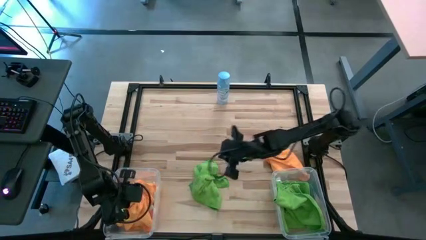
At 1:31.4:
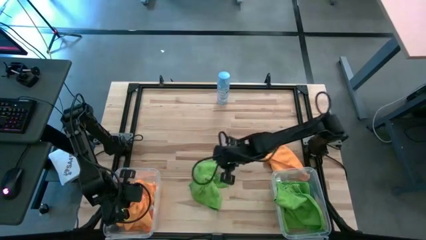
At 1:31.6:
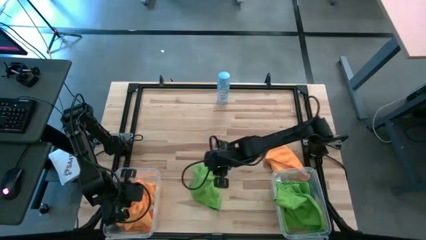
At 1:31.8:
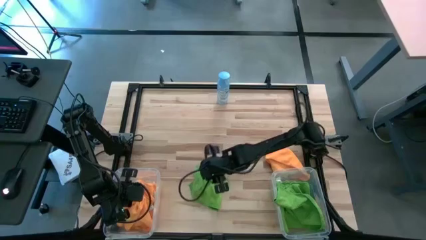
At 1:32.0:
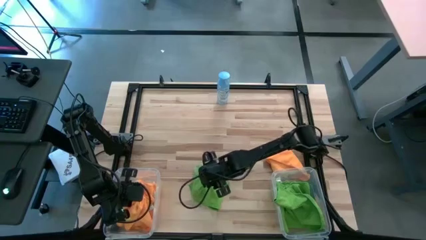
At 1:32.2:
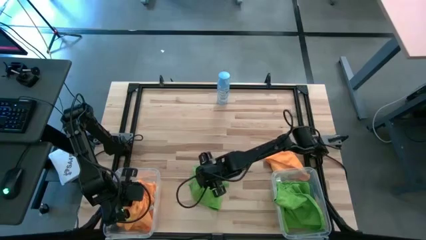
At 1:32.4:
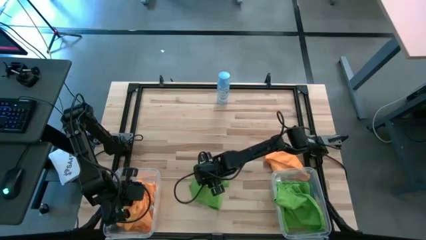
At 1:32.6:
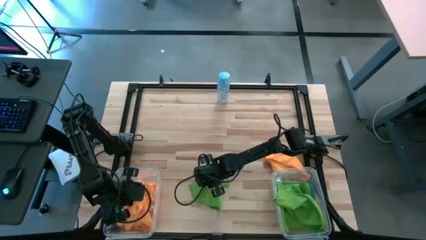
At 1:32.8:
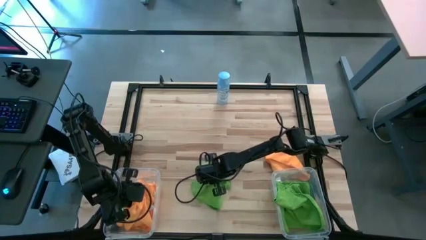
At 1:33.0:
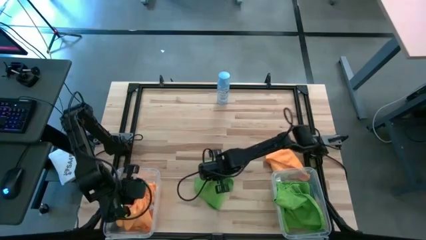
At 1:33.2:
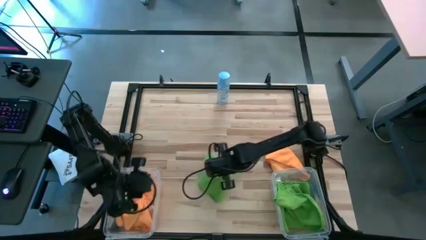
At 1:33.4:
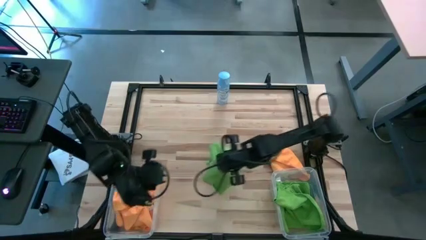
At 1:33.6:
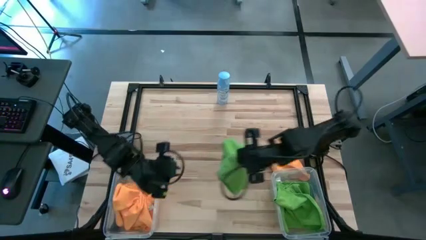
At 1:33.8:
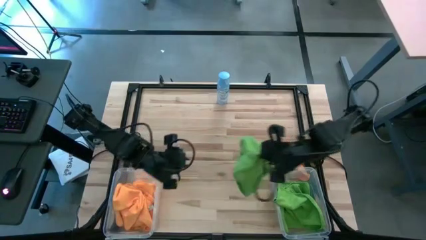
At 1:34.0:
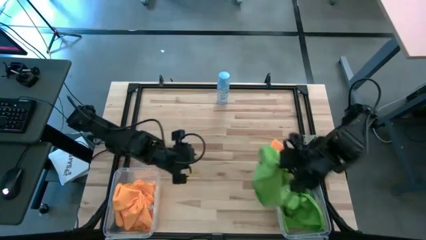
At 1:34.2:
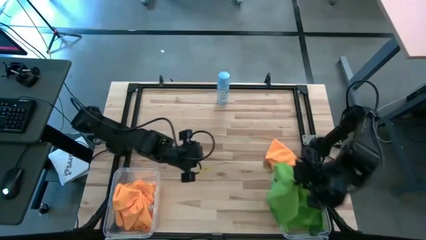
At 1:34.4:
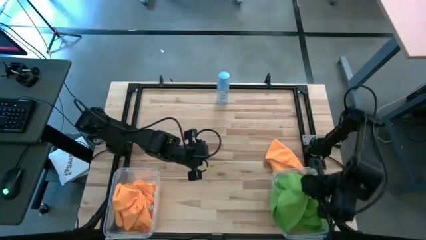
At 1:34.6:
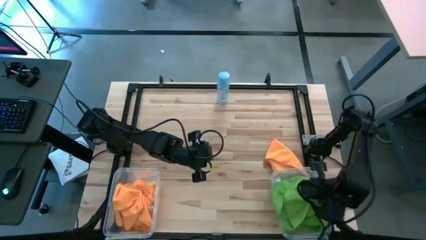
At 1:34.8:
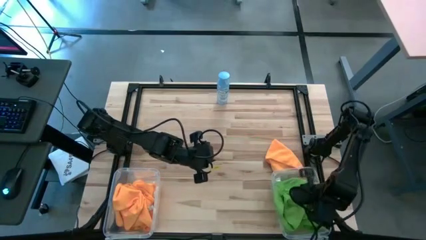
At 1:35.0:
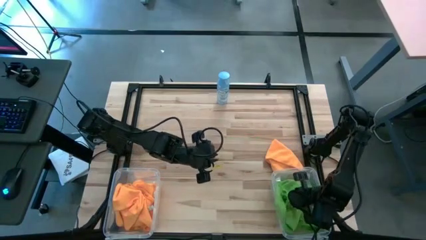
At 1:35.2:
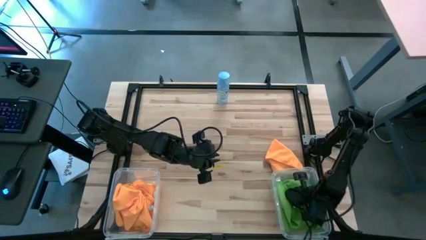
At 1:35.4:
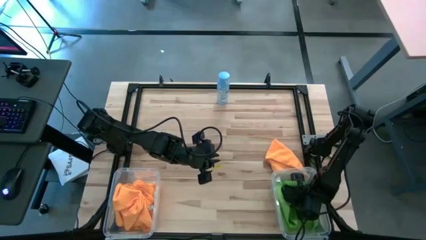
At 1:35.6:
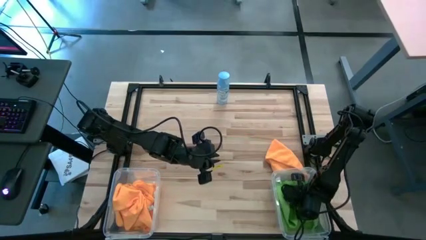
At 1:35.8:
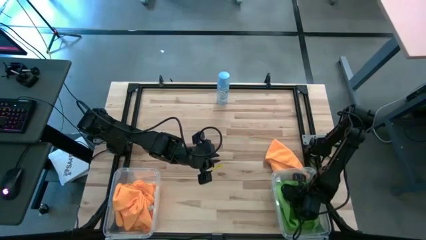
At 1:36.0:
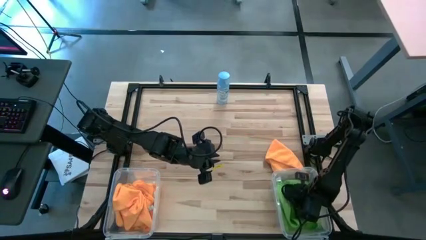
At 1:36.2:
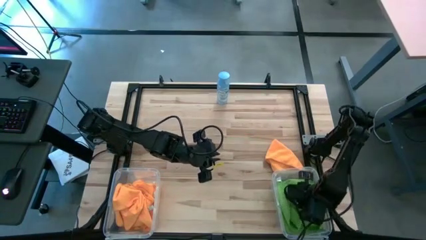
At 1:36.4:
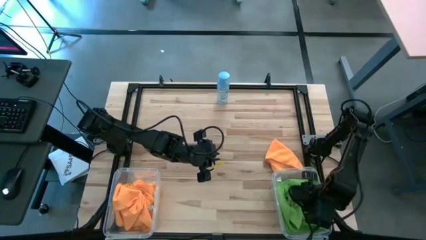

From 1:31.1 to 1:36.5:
Task: Sort microfiber towel by color & place in baskets
Put the green microfiber cloth into the right transparent bin

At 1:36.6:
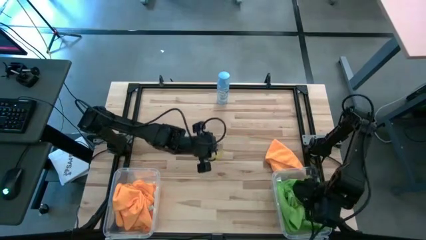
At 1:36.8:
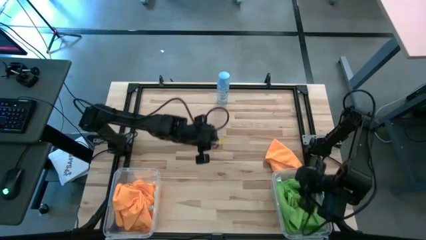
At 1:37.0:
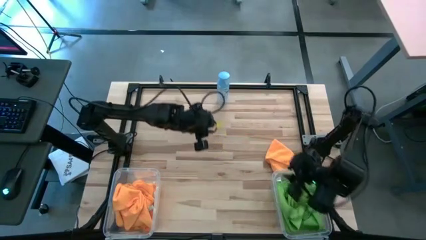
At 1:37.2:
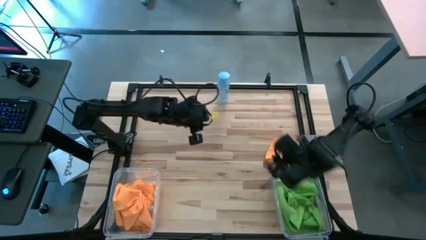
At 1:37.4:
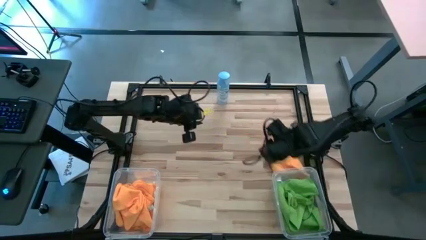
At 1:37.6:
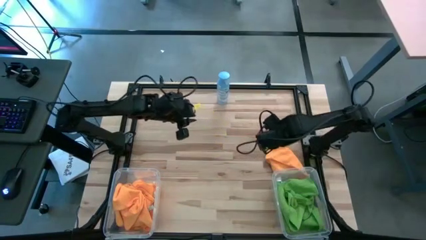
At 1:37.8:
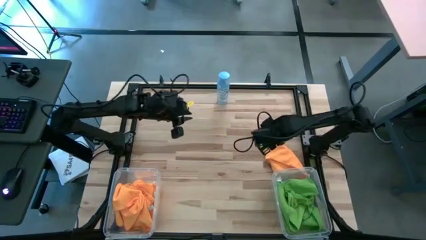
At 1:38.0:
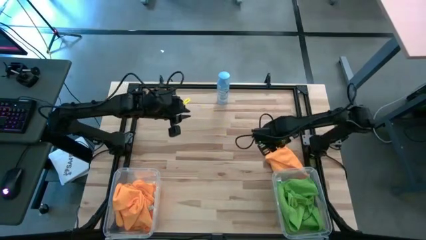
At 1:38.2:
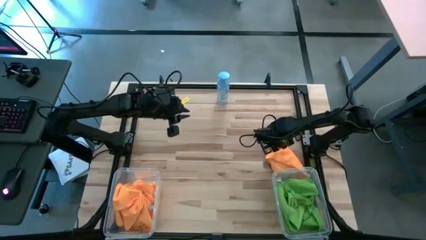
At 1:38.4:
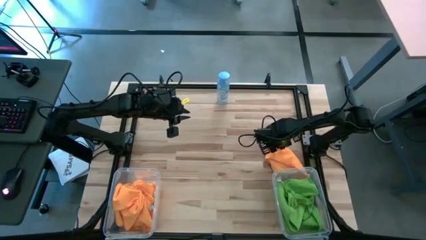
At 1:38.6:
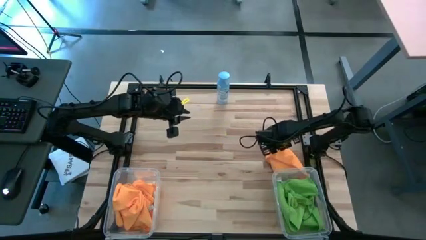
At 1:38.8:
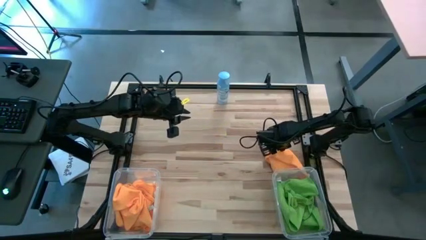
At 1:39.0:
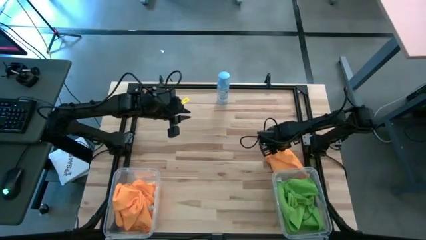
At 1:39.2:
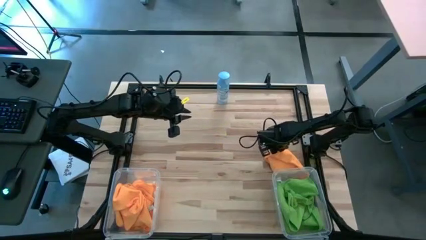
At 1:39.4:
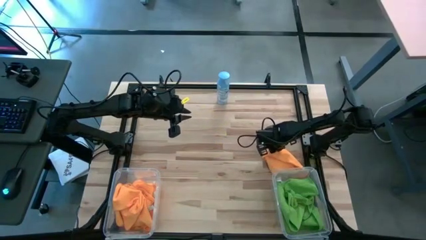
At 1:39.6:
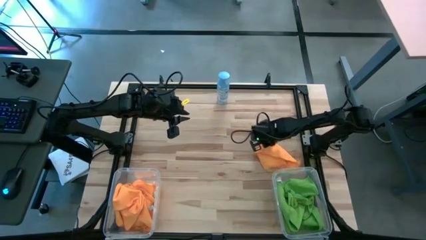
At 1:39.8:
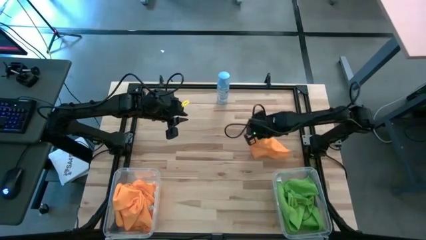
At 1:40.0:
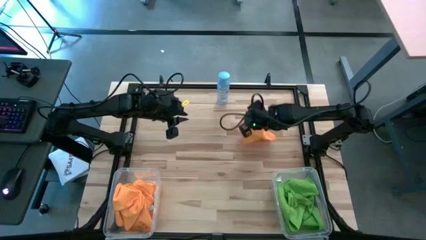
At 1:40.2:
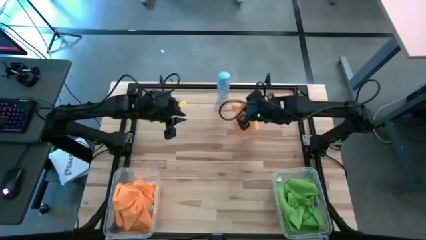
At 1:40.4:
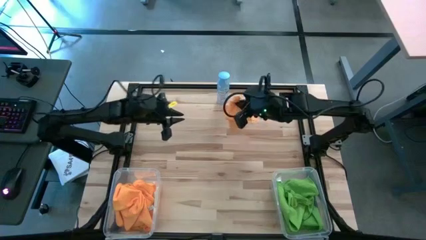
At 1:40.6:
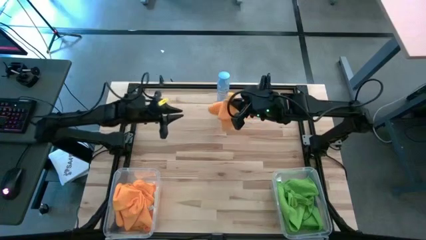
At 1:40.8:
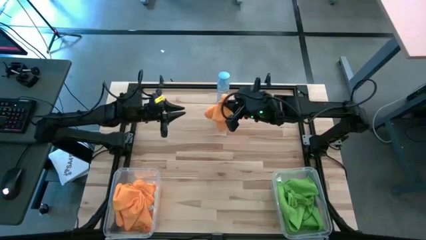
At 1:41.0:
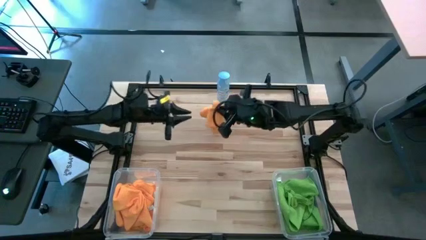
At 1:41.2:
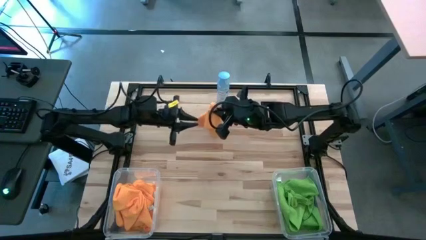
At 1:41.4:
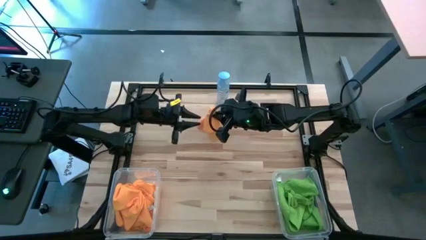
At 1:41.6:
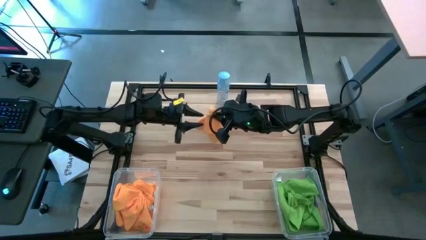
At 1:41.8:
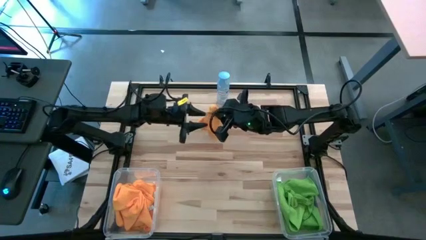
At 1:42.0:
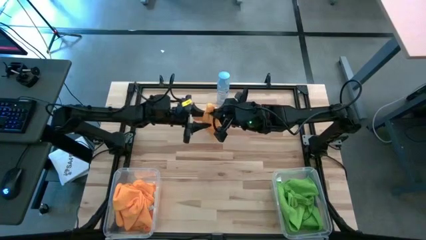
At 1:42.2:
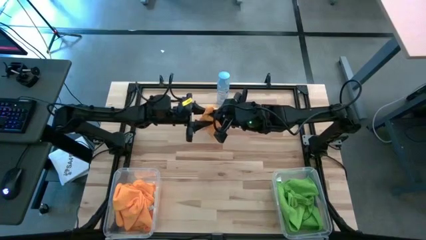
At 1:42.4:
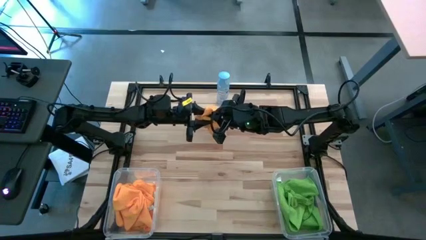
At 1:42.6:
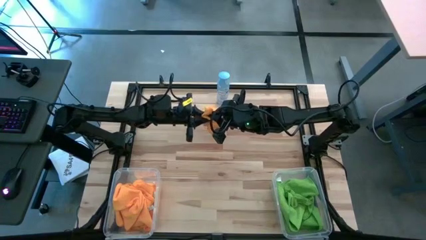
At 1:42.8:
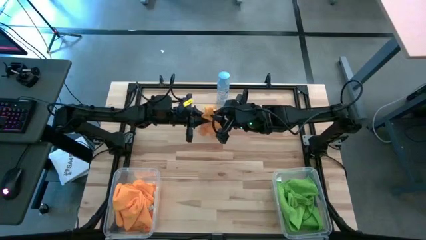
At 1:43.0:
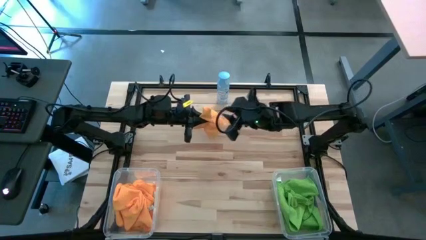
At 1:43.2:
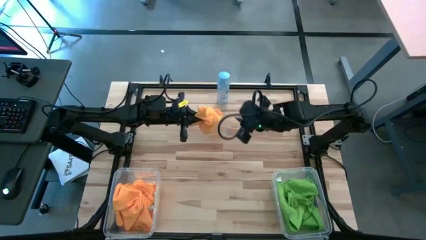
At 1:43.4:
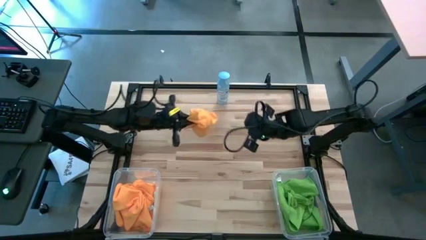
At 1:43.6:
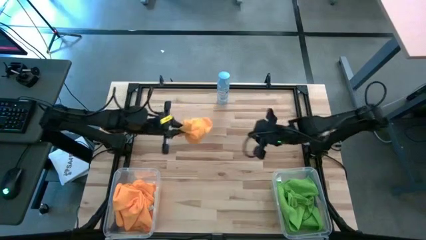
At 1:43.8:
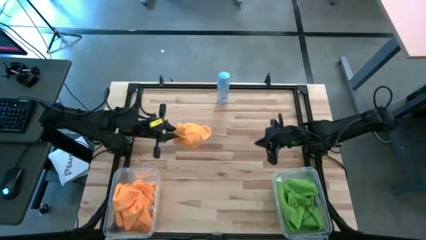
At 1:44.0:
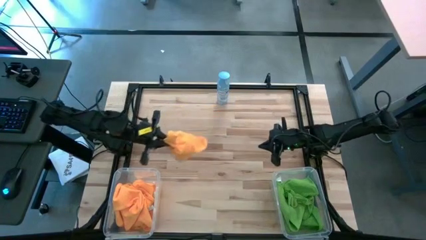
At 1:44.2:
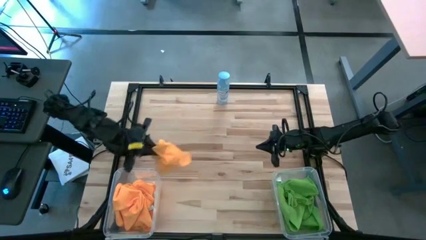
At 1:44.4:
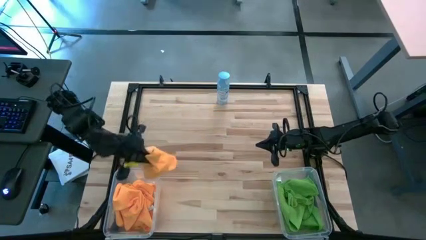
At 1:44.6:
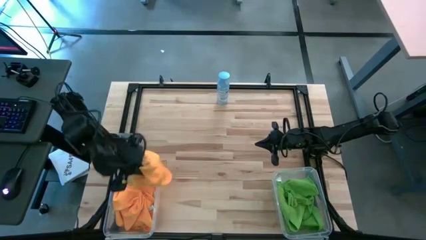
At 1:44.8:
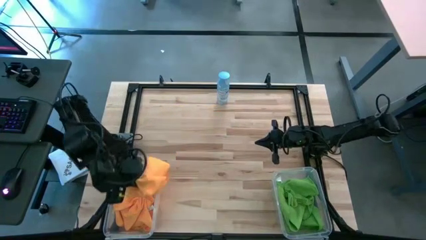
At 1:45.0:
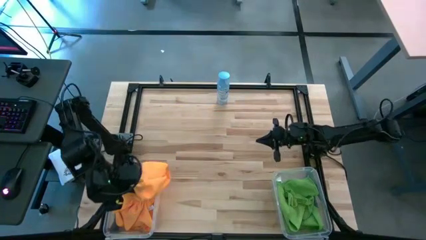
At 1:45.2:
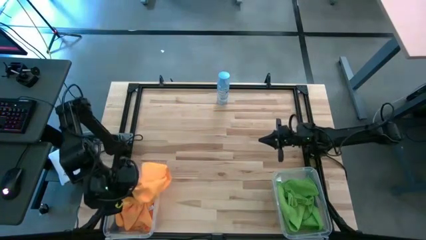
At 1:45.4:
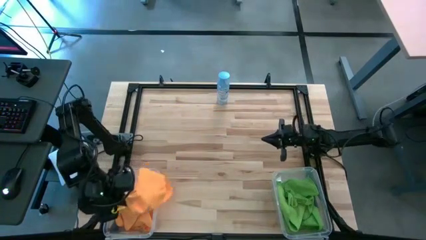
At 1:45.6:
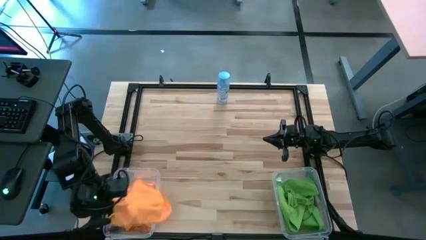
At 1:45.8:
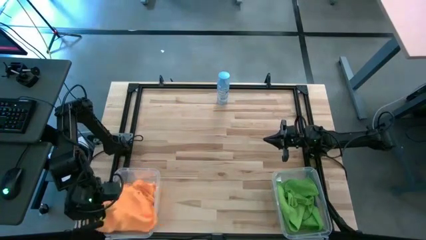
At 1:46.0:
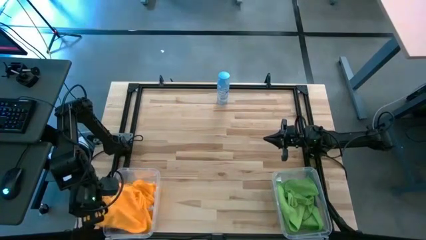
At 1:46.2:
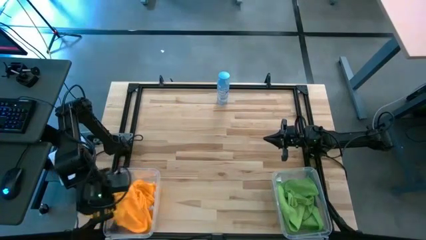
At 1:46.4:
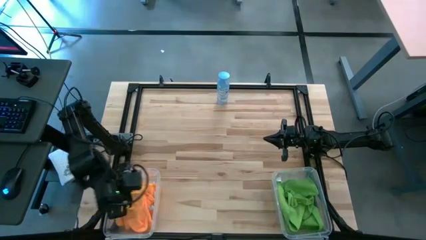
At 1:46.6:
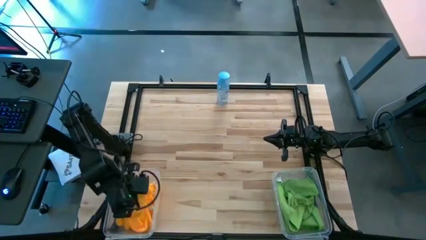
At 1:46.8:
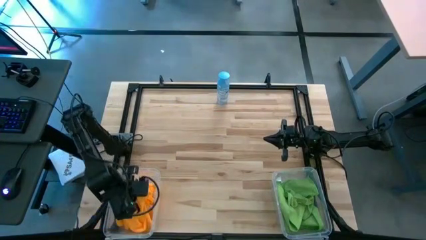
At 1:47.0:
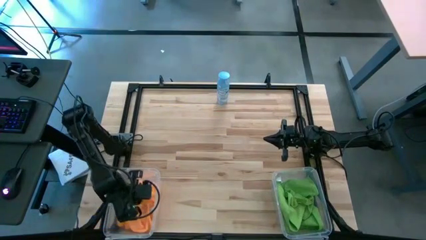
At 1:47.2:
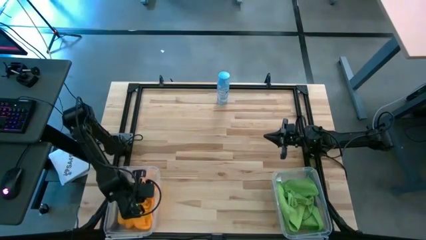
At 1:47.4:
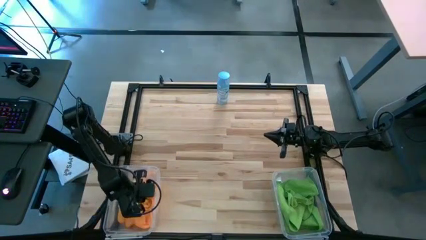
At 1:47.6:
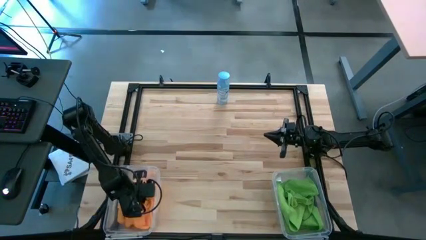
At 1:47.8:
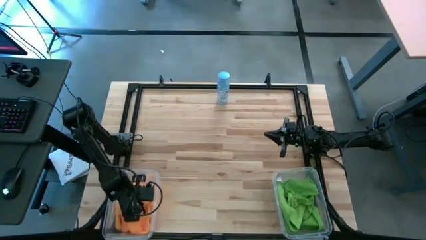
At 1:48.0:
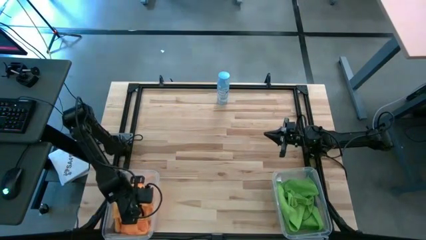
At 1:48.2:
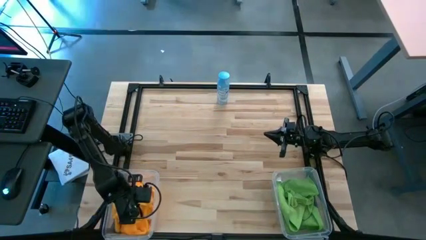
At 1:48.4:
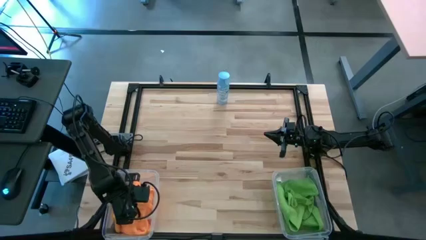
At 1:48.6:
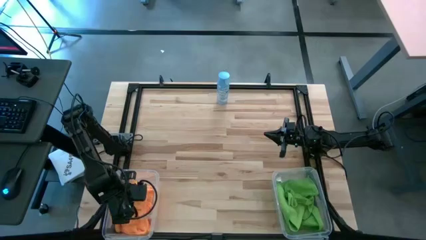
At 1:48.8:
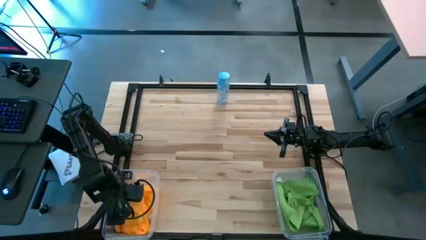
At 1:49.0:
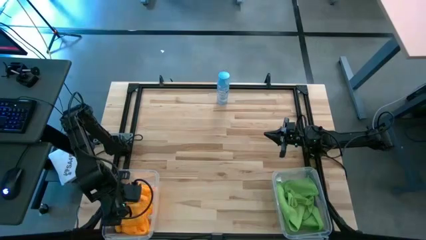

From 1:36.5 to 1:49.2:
Put the orange microfiber cloth into the left transparent bin
